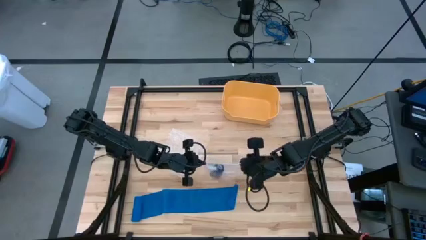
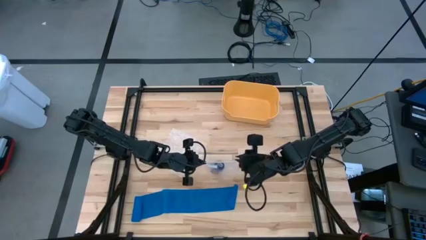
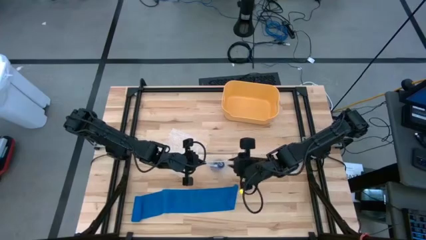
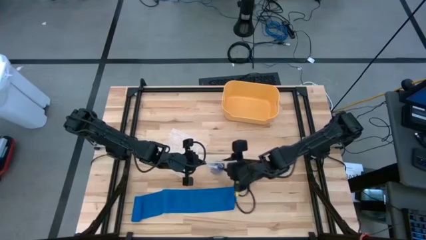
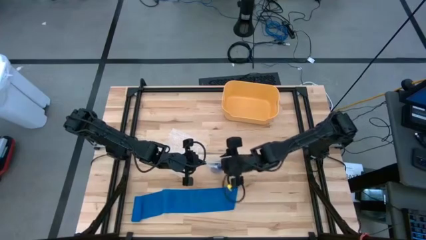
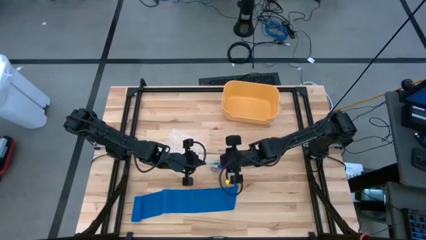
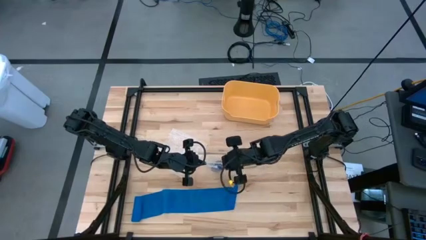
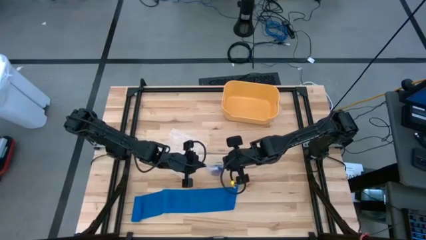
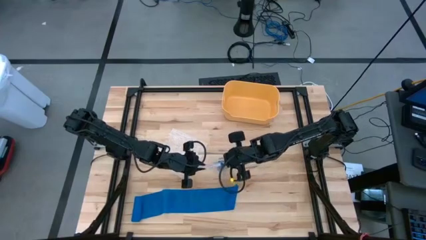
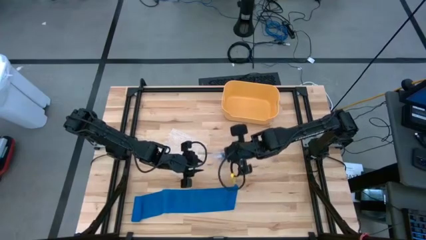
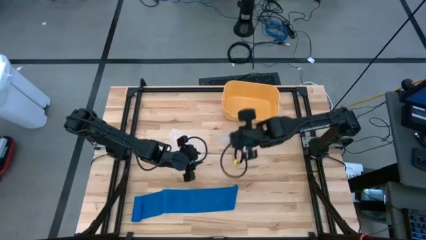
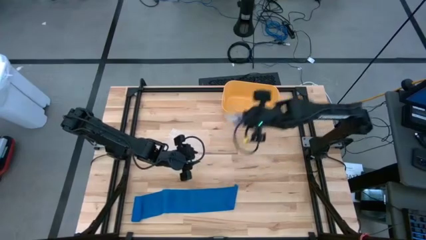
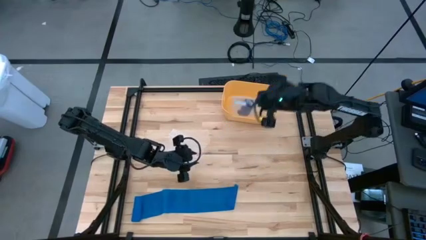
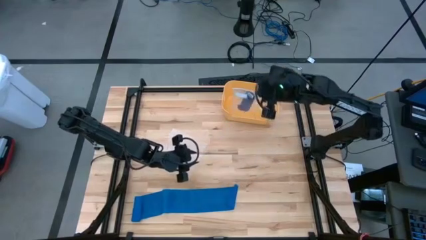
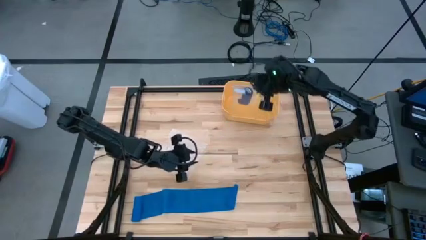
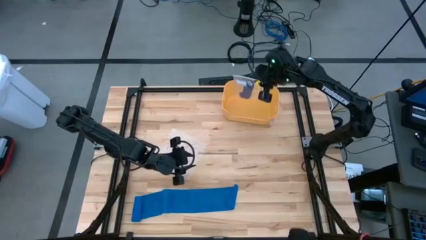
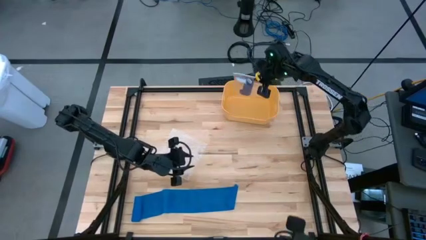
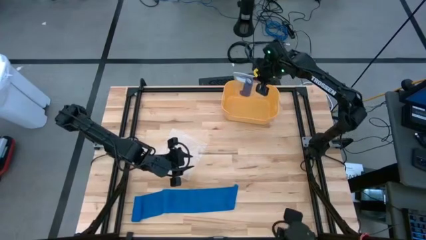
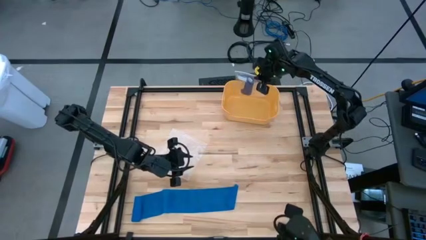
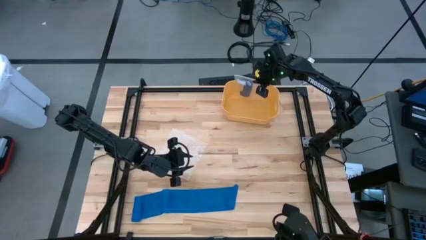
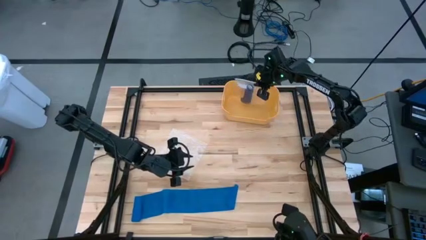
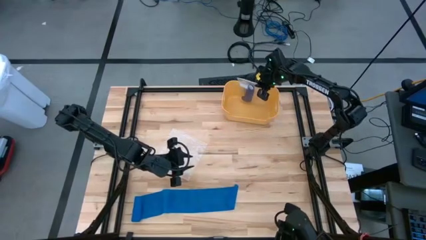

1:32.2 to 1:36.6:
Task: Roll bandage
Put the transparent zip bag into the orange bin

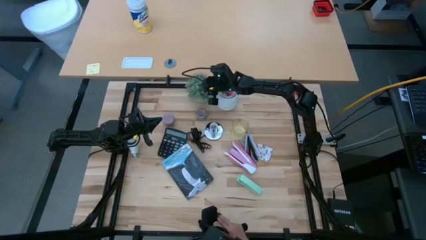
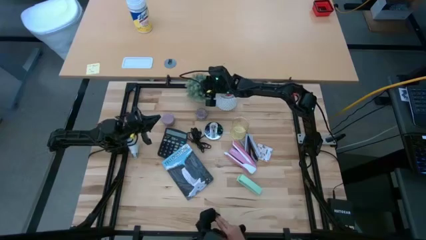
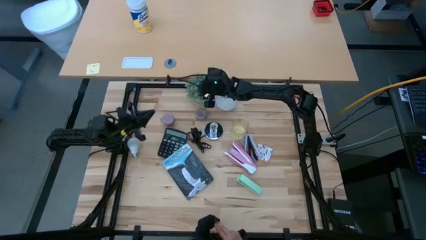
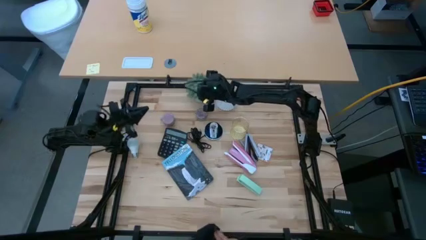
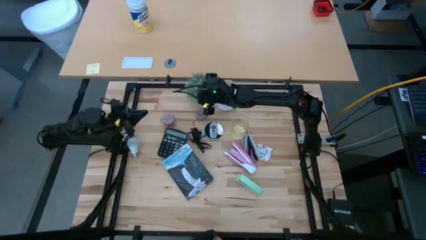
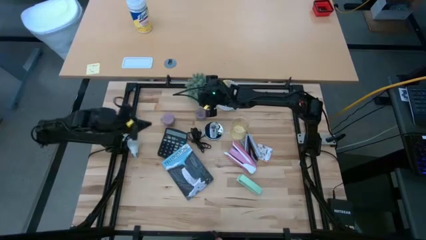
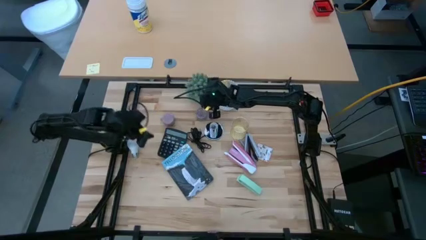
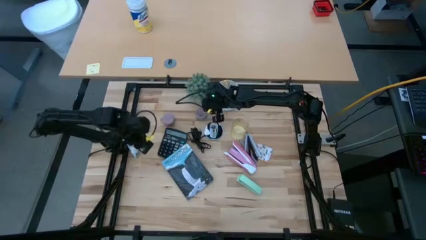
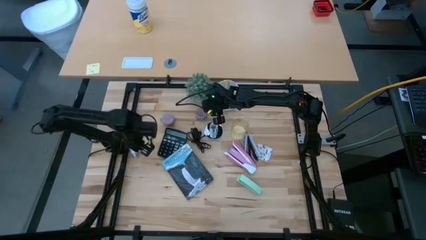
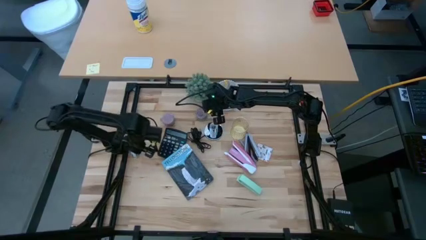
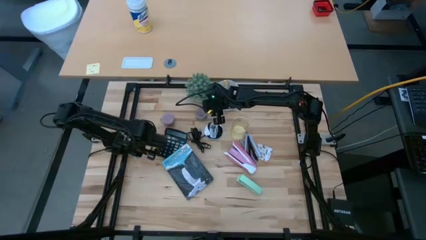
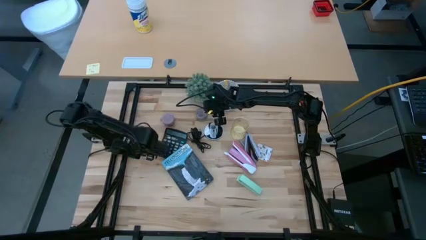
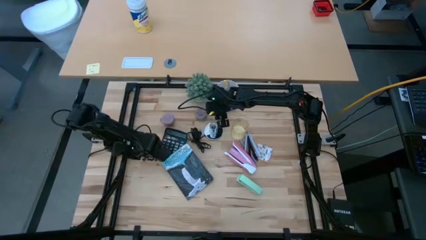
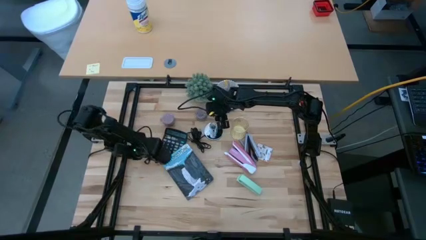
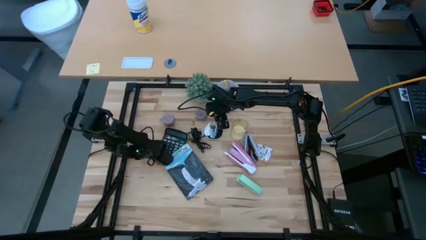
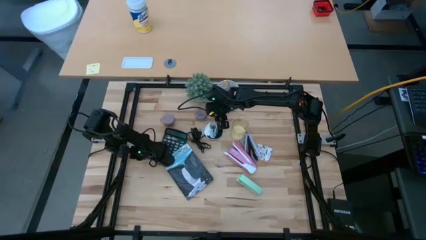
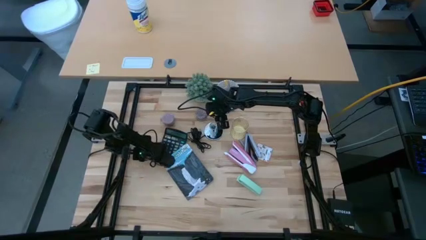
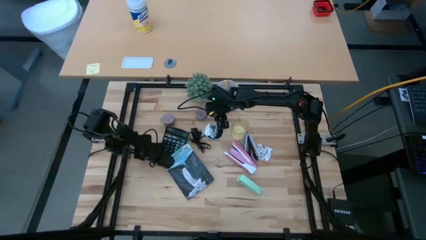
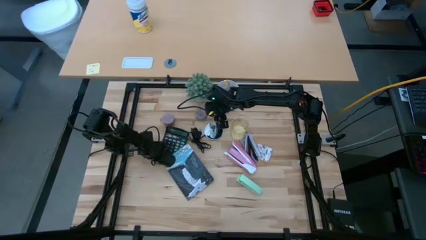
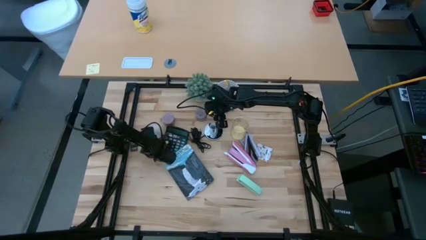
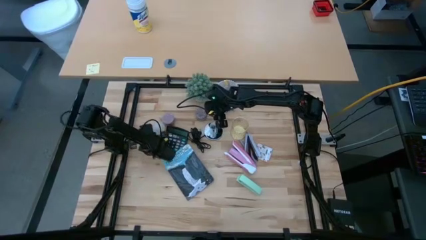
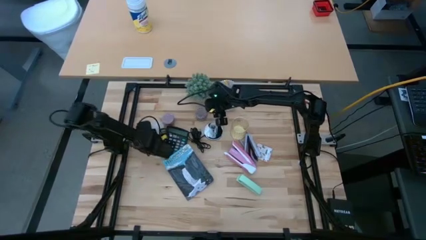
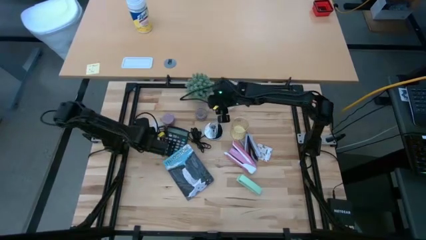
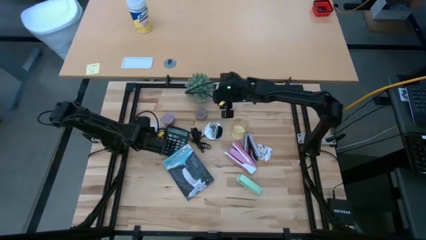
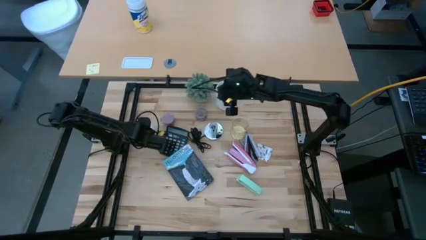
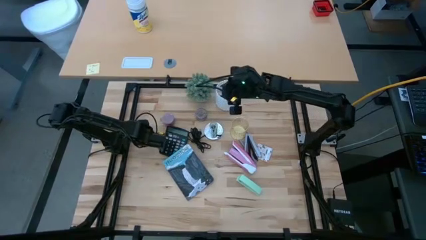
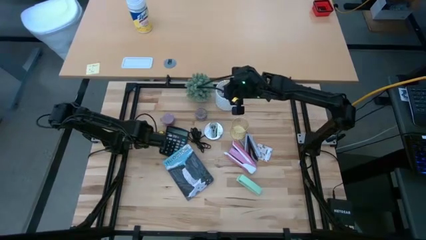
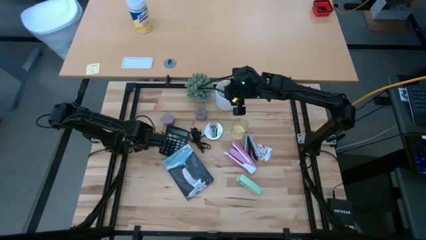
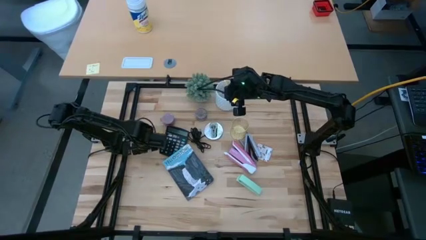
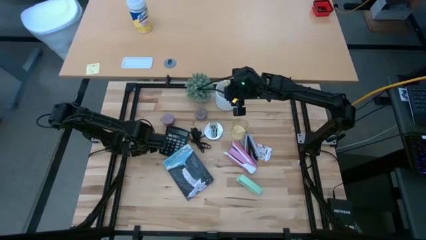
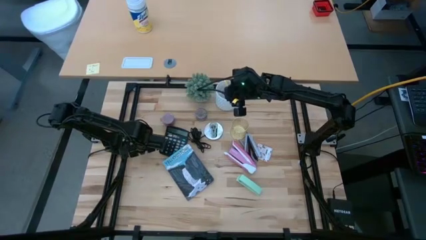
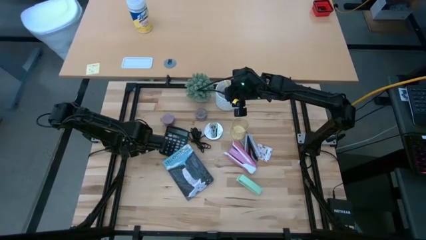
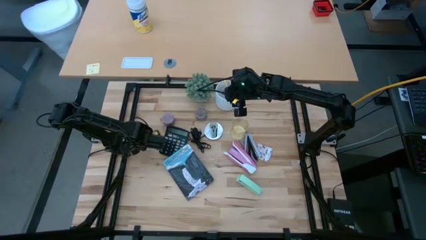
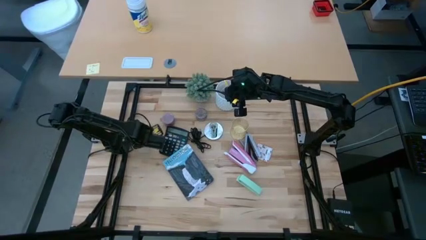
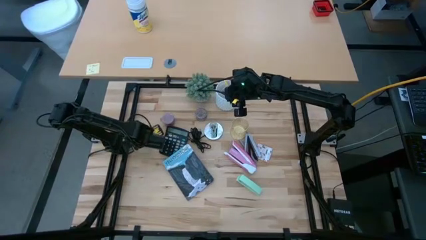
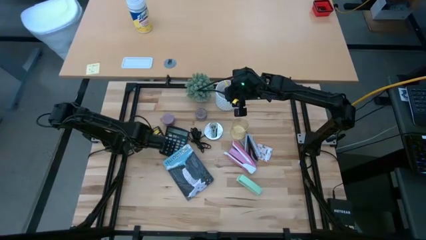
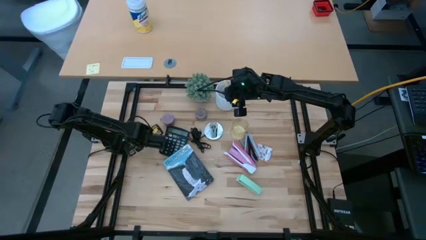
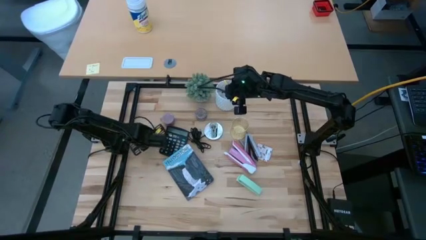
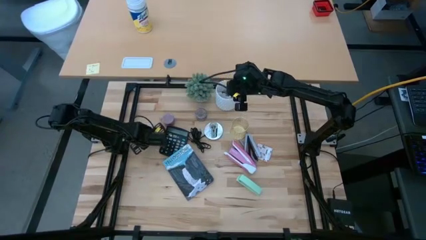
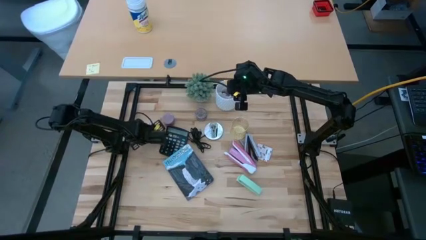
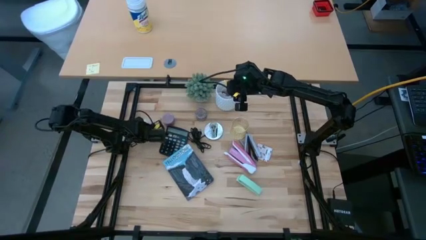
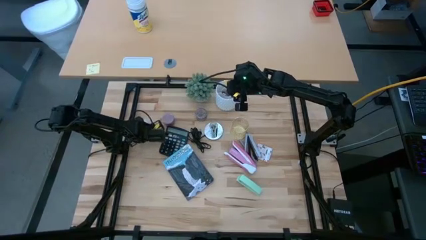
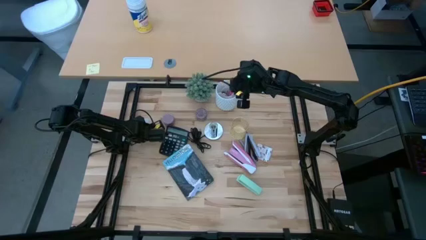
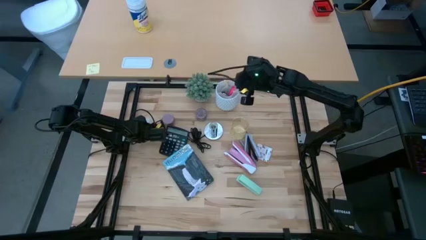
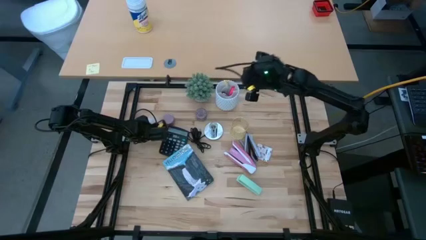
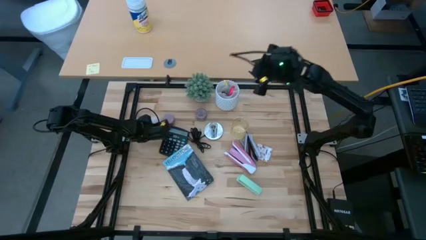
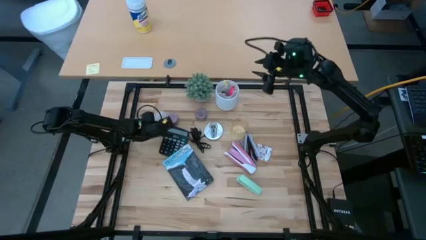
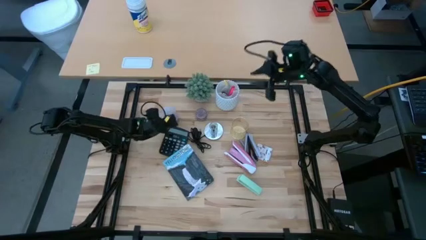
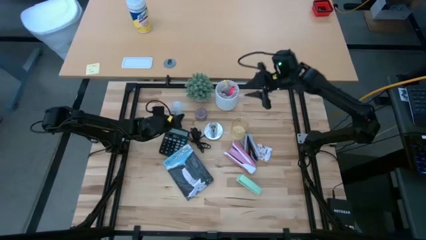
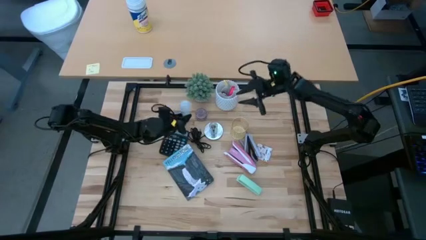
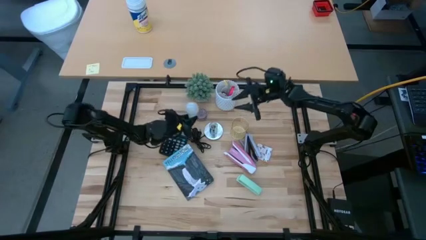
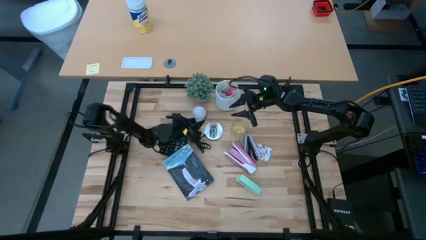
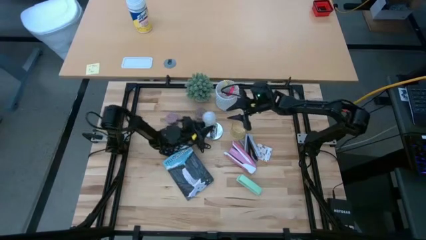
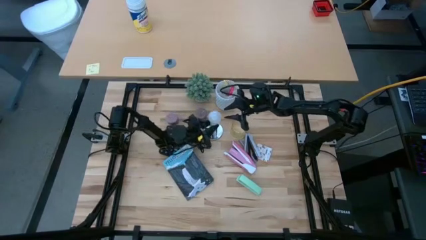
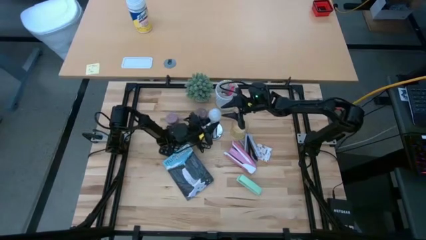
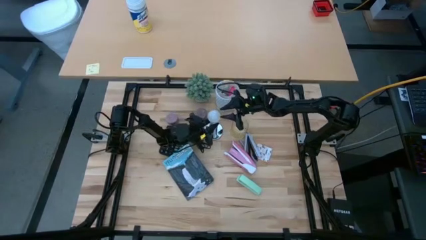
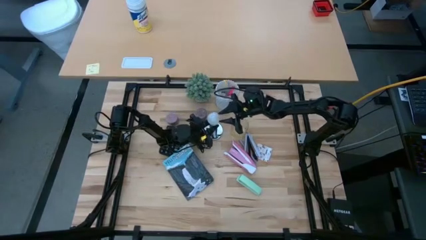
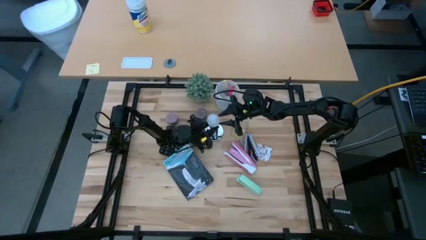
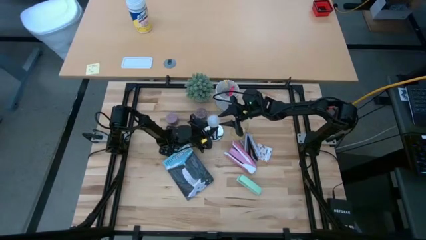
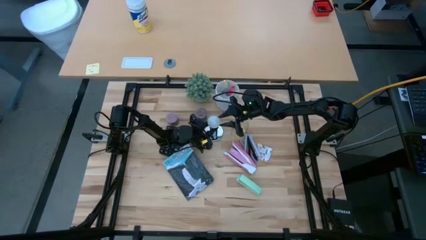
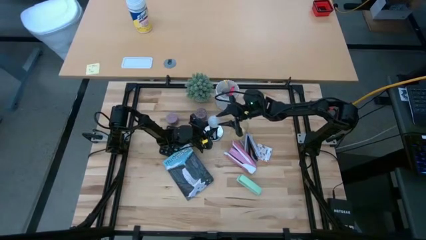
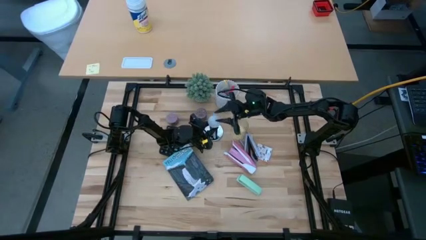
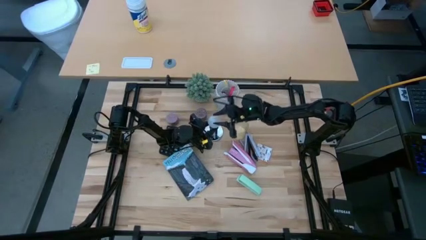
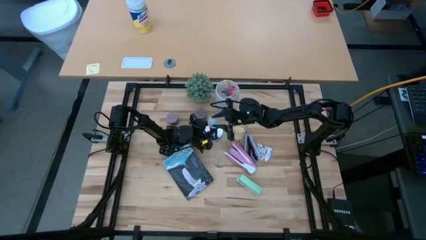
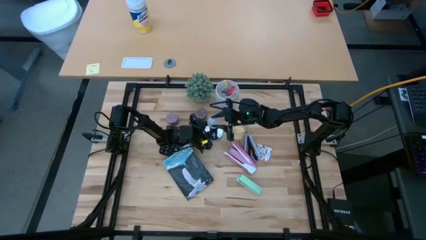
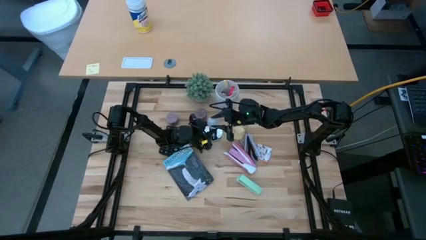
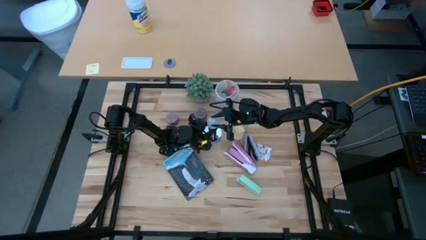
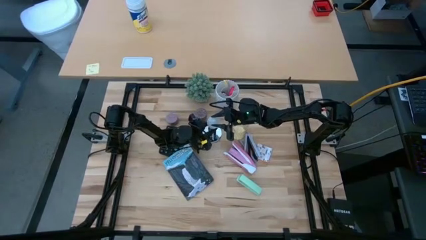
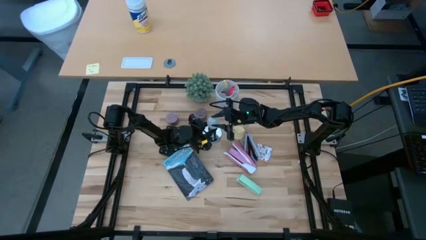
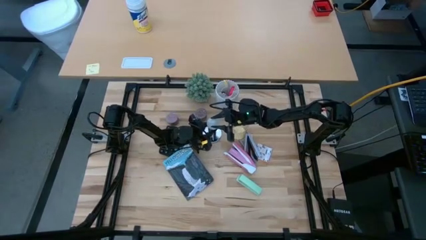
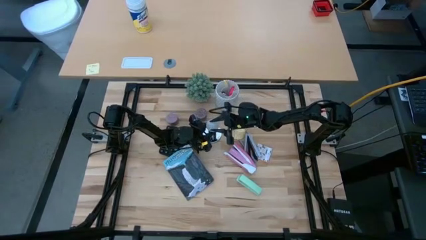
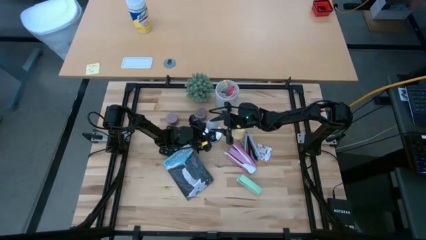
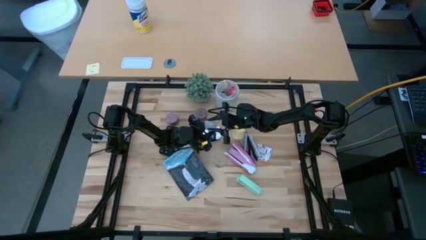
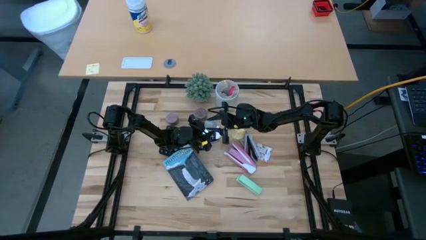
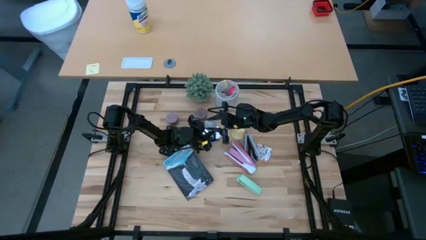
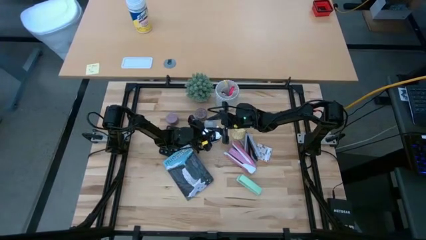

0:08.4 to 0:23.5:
Task: Screw lightbulb
Insert the lightbulb into the lamp
